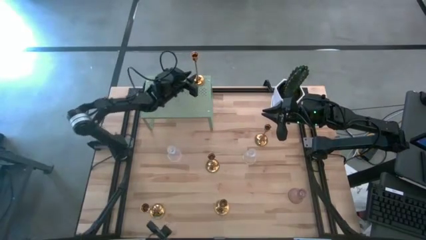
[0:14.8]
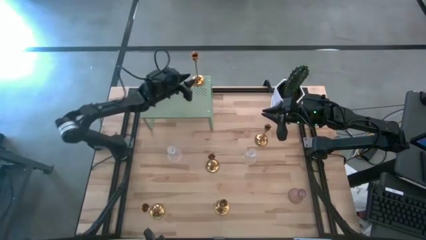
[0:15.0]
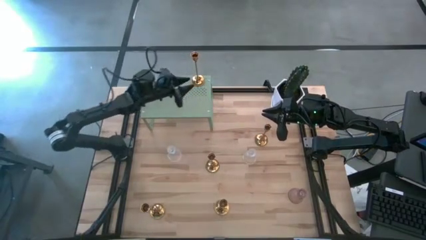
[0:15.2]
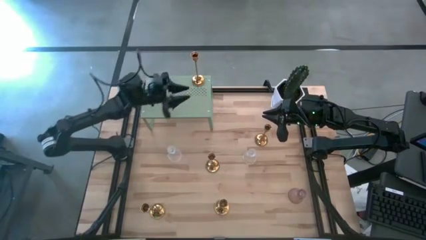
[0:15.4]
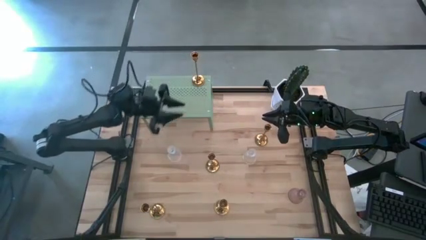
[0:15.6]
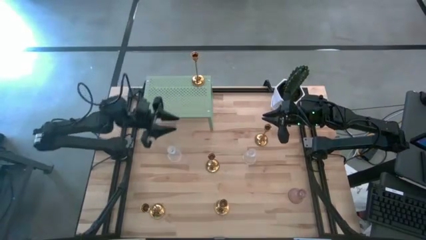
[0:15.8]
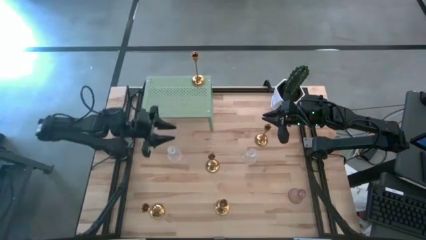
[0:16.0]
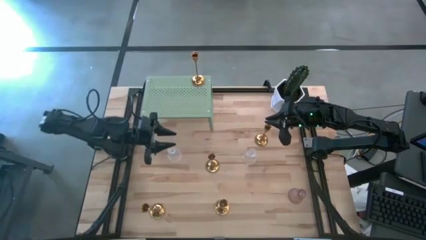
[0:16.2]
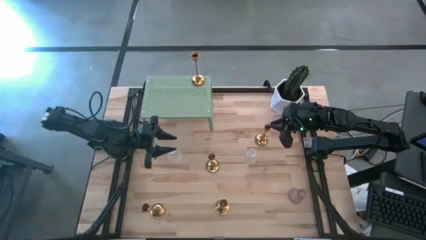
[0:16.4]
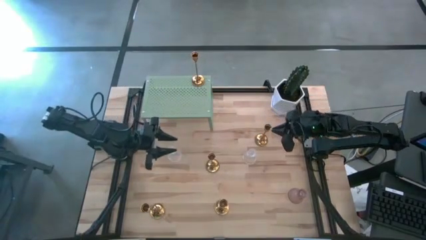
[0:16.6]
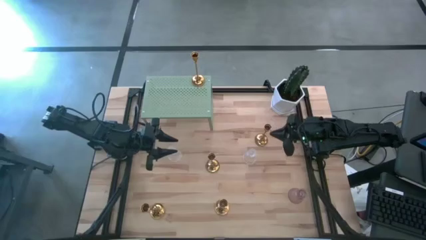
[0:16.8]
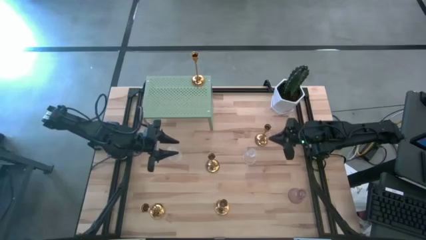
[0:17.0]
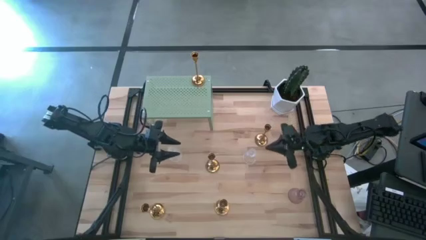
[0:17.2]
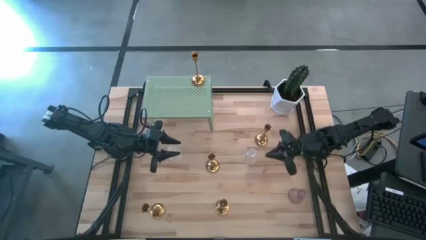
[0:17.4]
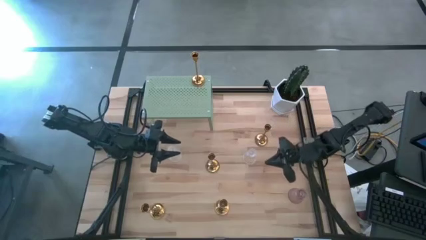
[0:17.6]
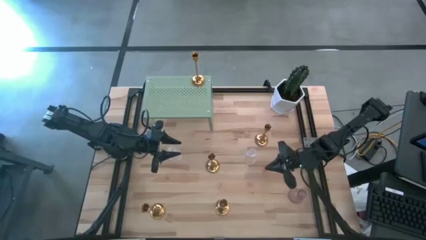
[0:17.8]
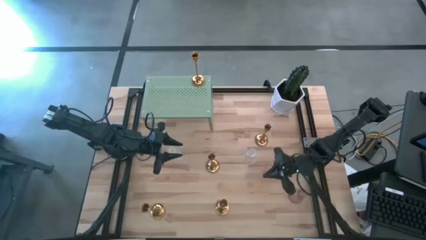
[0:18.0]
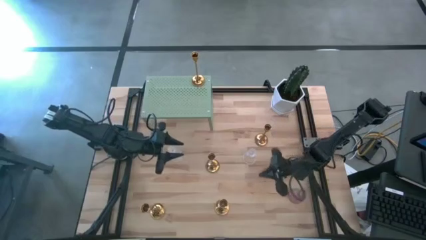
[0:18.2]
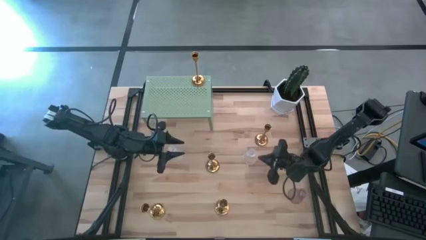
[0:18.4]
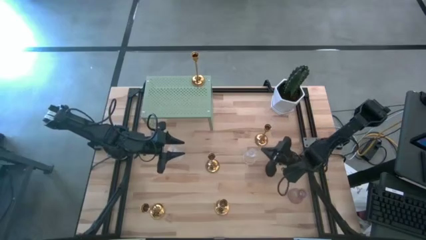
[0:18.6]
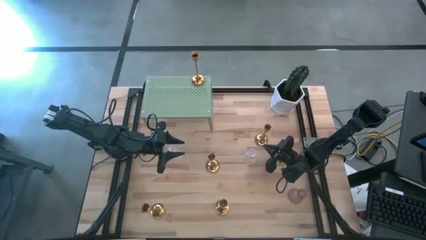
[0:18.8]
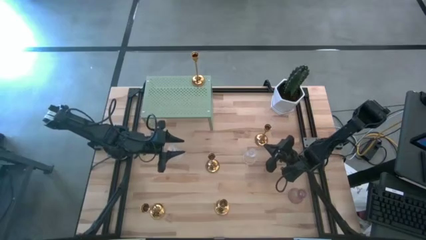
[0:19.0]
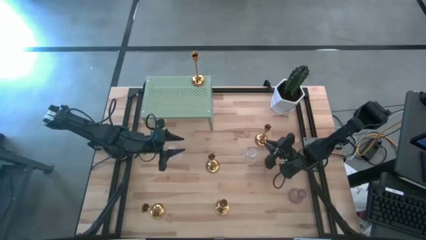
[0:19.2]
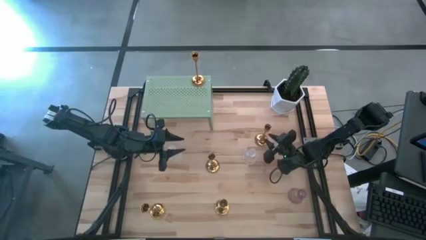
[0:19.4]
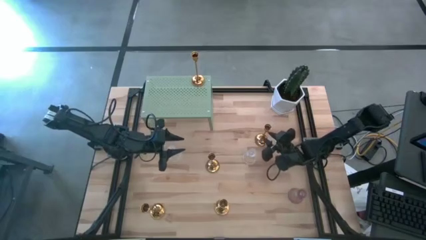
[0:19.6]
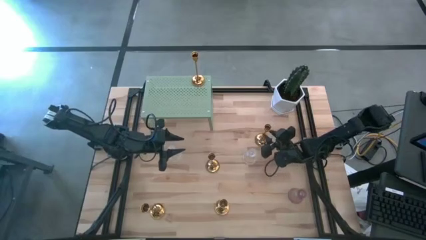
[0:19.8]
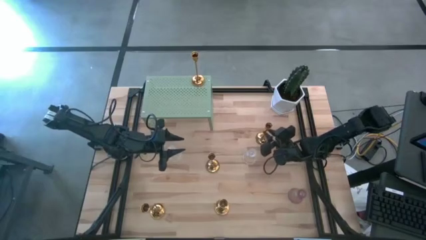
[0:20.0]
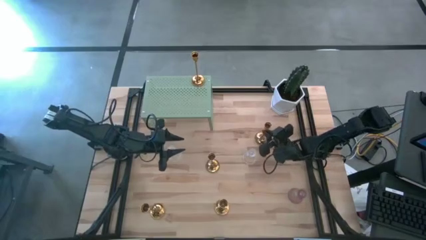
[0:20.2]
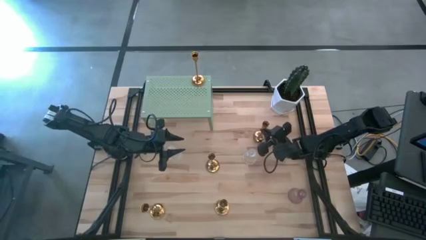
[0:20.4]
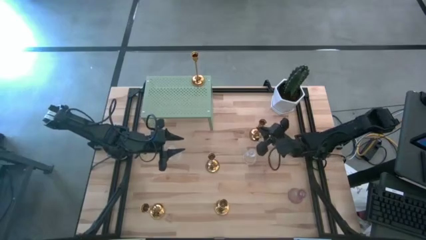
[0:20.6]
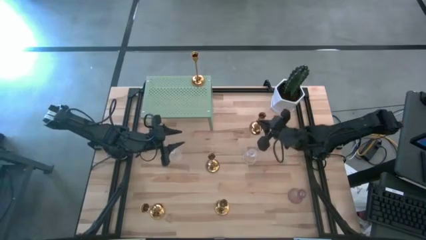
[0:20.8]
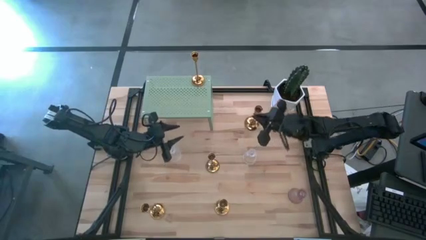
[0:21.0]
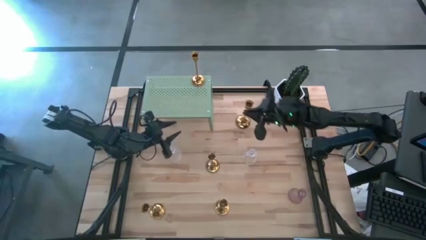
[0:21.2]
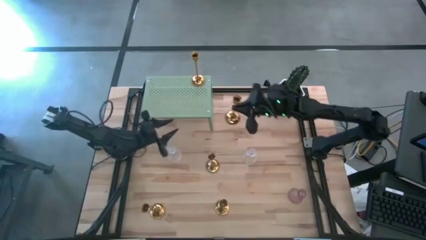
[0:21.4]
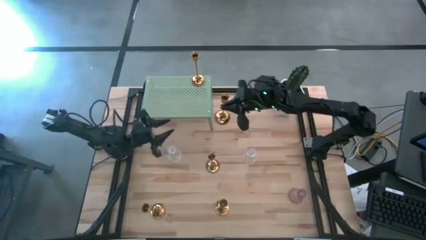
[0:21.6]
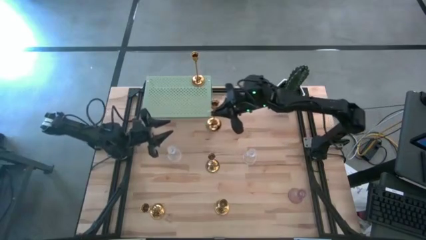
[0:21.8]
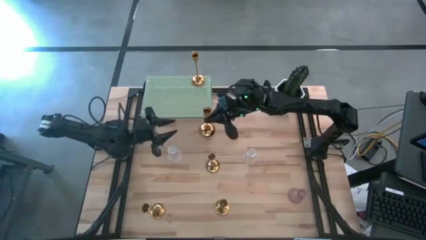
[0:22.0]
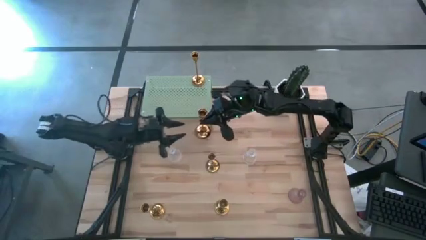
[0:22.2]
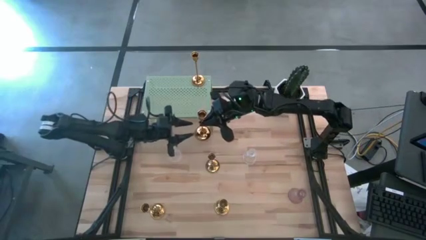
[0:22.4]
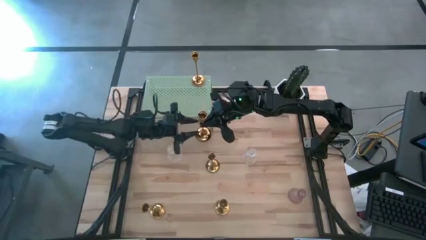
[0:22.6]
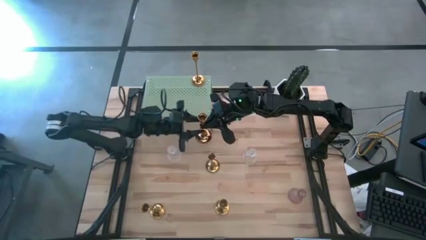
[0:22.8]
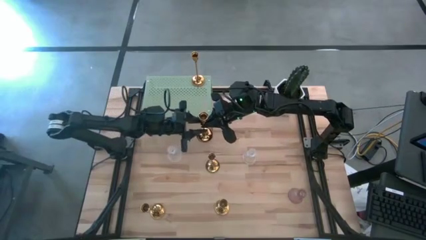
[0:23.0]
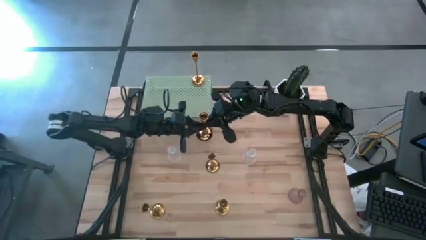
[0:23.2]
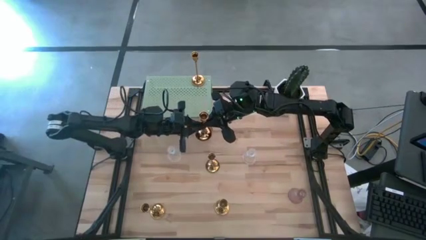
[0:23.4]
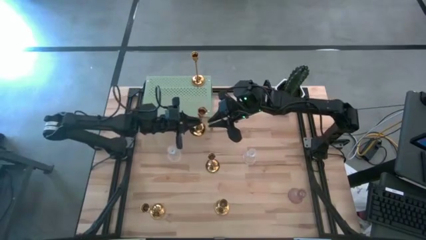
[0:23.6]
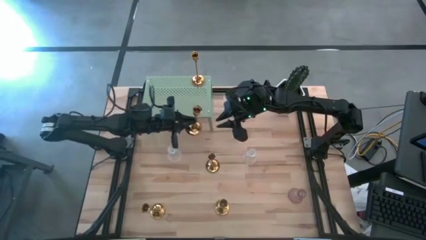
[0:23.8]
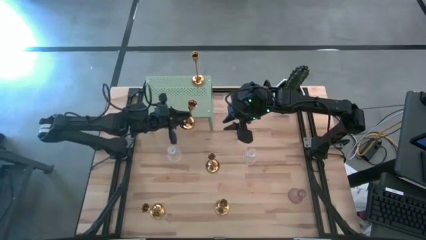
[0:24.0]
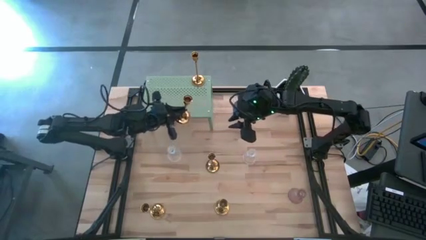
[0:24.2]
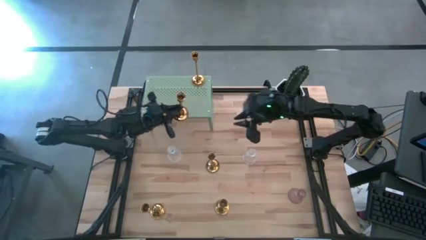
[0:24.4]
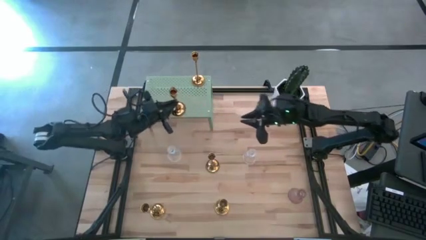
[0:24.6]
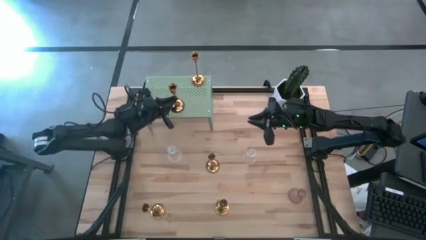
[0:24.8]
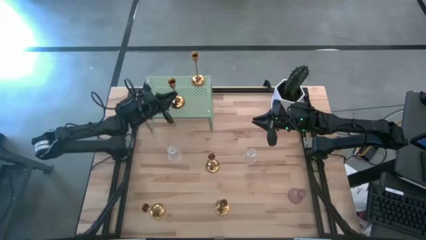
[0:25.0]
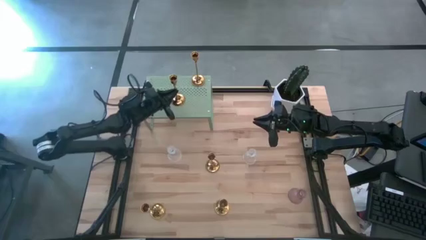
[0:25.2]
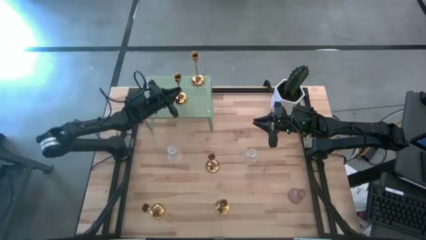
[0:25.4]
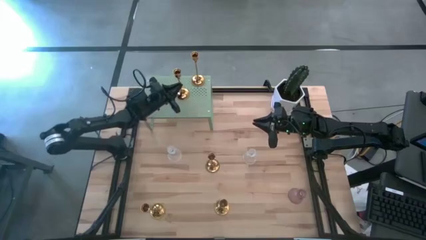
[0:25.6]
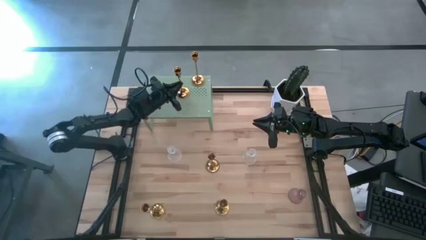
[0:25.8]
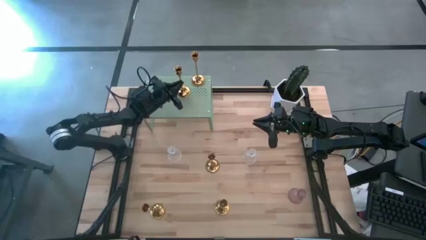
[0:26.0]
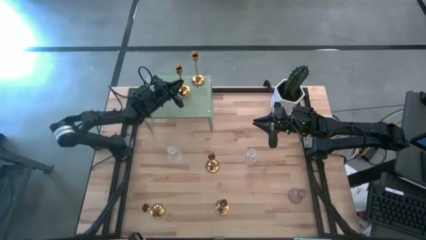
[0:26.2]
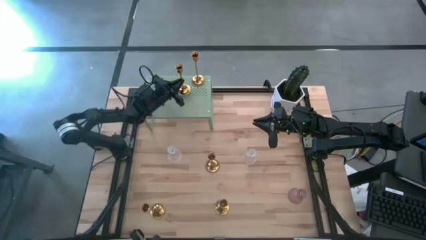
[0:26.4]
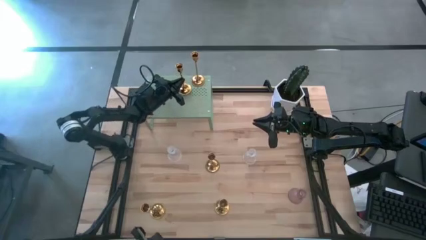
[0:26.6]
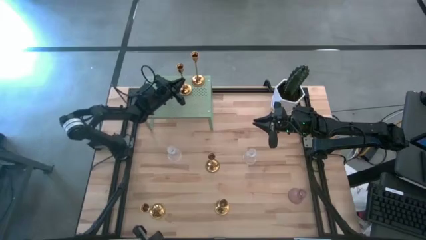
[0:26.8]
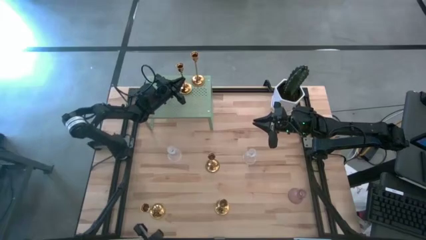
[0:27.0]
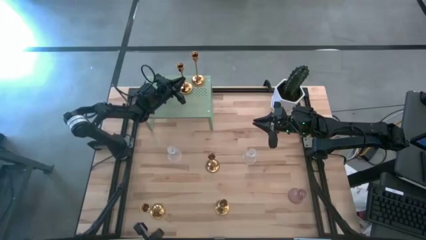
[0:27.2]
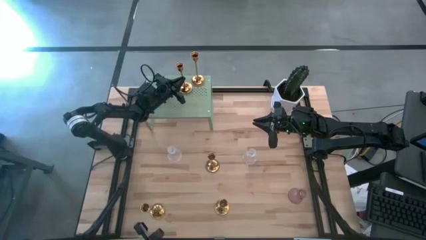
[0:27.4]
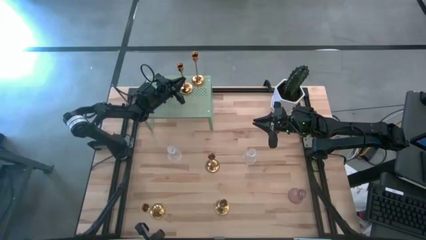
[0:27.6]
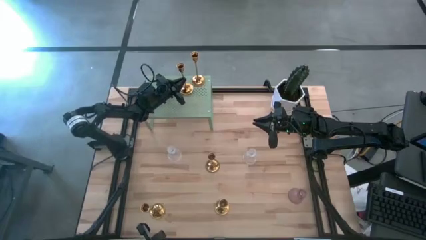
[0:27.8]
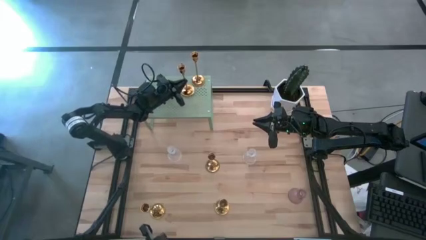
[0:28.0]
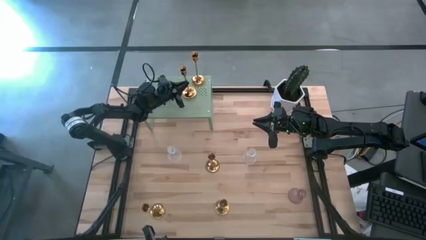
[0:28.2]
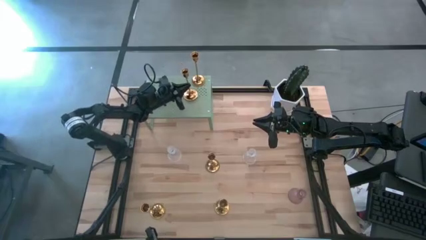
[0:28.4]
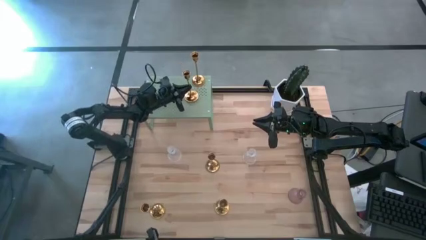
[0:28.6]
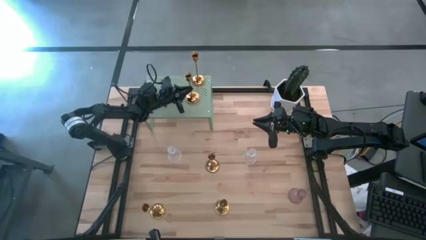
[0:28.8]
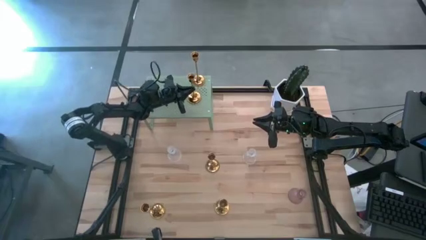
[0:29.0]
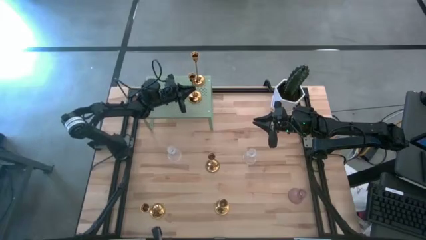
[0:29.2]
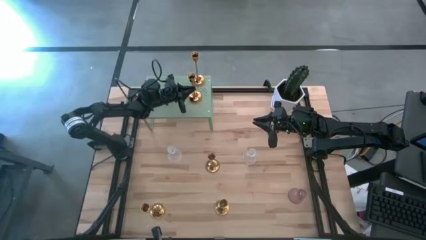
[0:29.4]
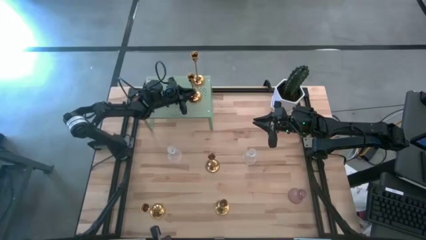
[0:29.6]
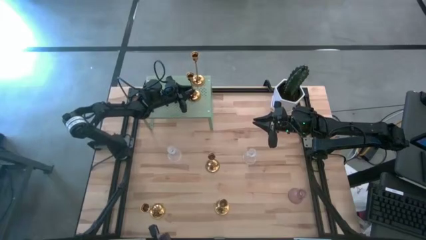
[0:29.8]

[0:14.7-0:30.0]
Task: Pick & Place candle stick holders
Put the candle holder on the shelf
